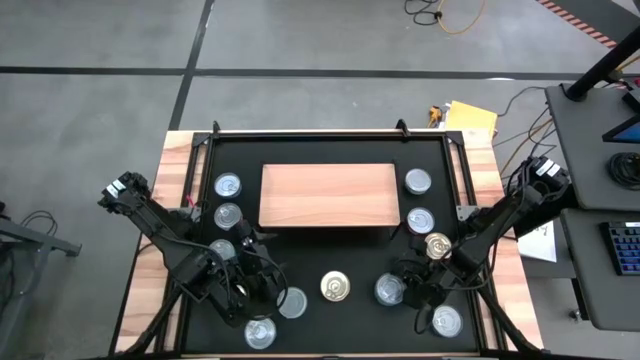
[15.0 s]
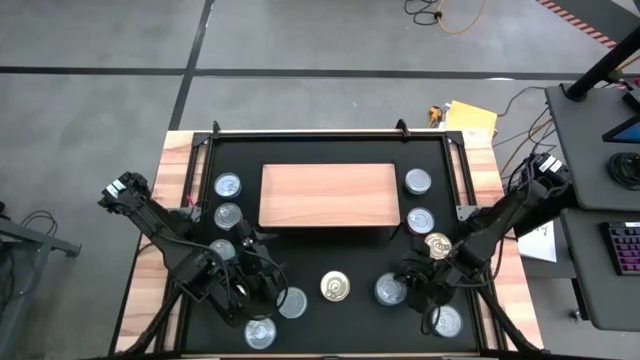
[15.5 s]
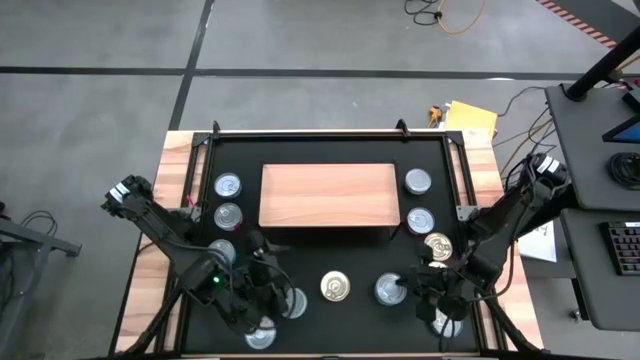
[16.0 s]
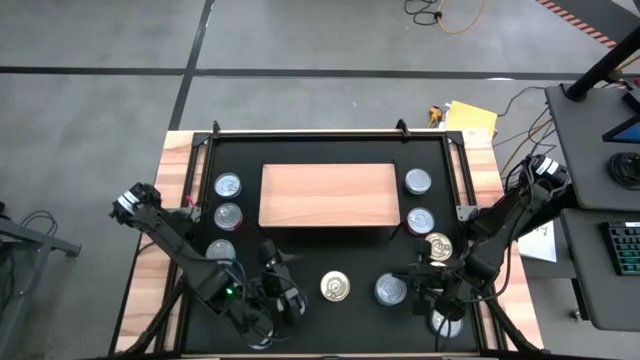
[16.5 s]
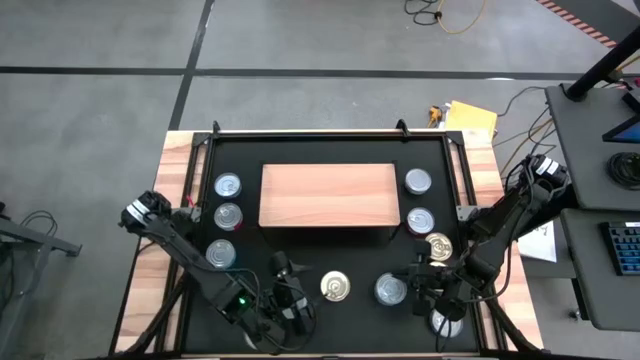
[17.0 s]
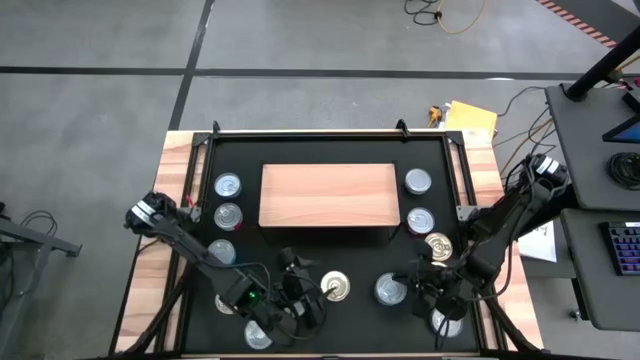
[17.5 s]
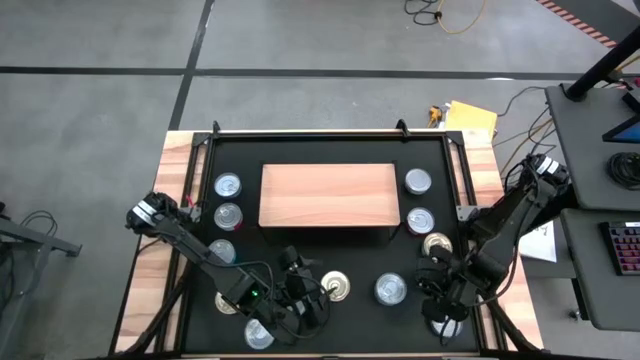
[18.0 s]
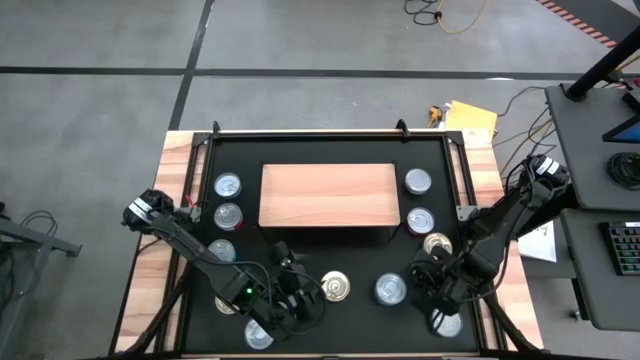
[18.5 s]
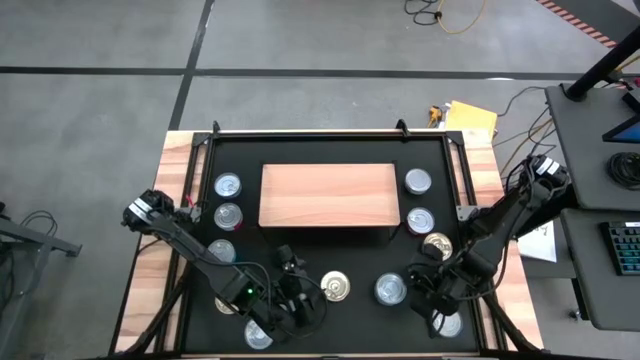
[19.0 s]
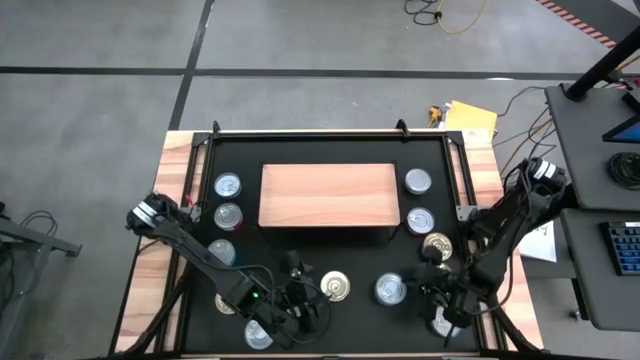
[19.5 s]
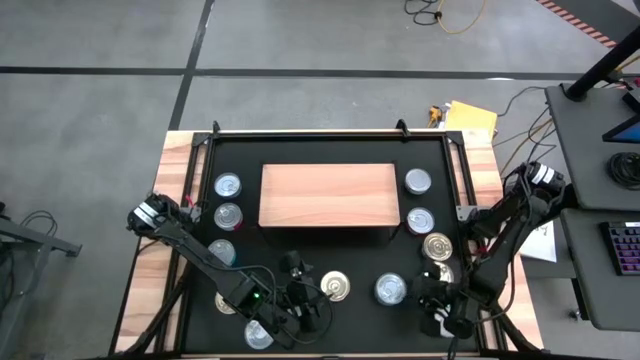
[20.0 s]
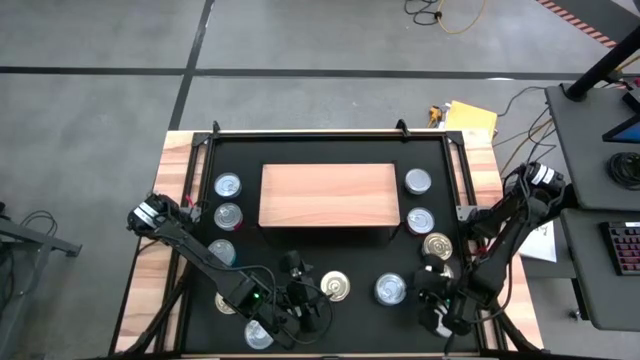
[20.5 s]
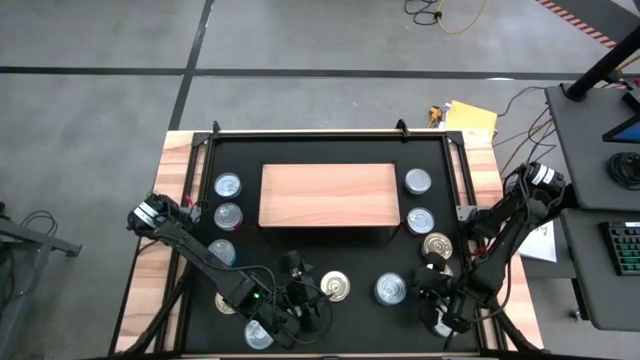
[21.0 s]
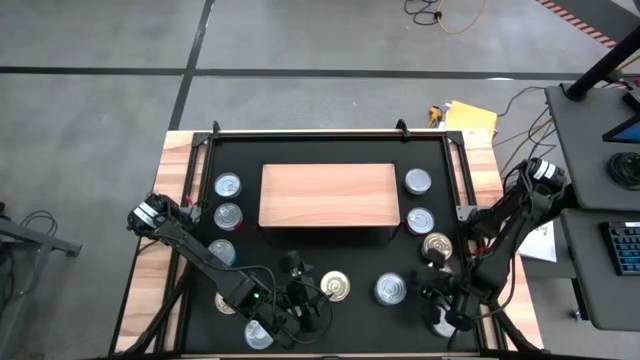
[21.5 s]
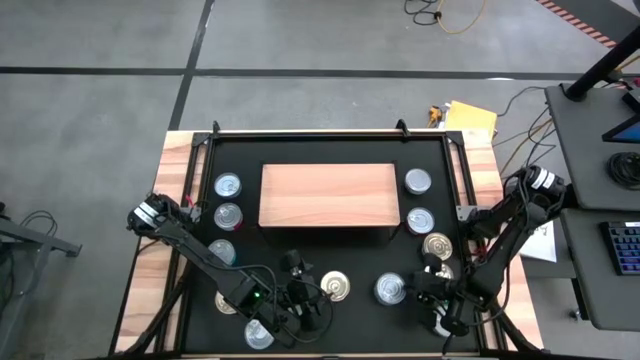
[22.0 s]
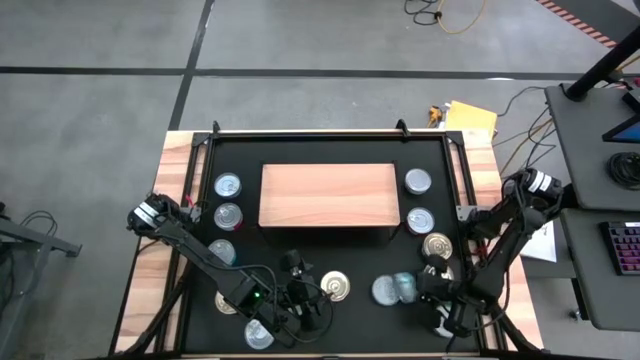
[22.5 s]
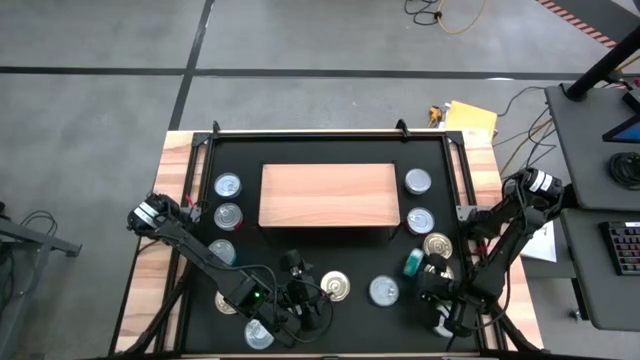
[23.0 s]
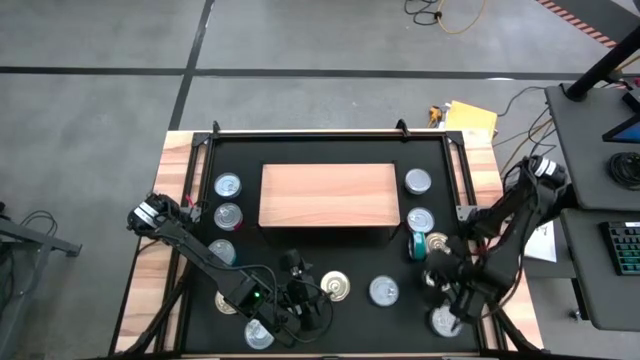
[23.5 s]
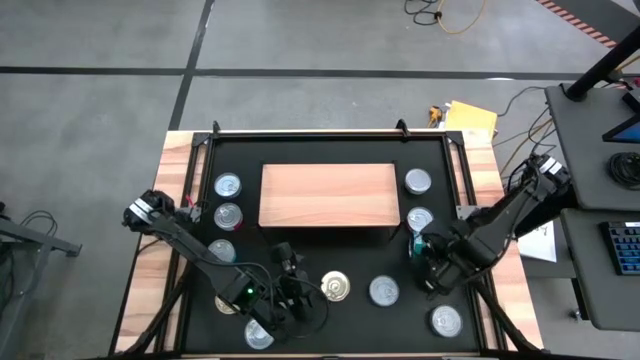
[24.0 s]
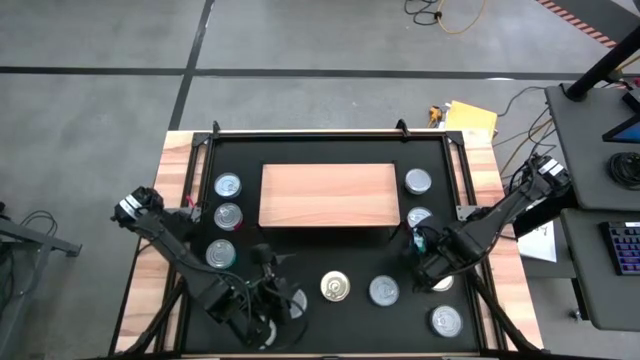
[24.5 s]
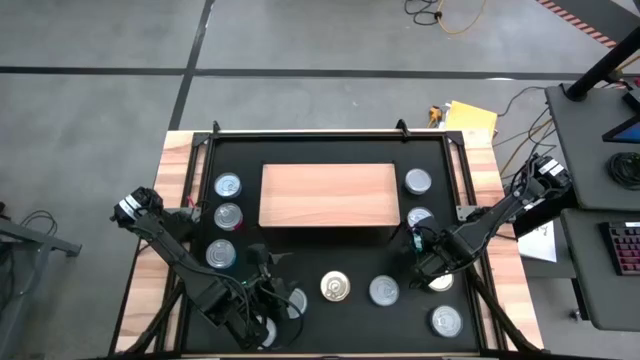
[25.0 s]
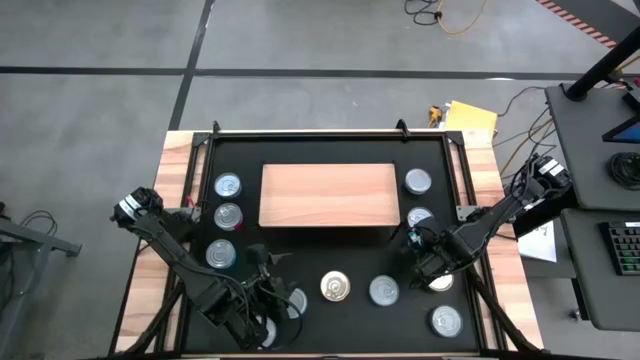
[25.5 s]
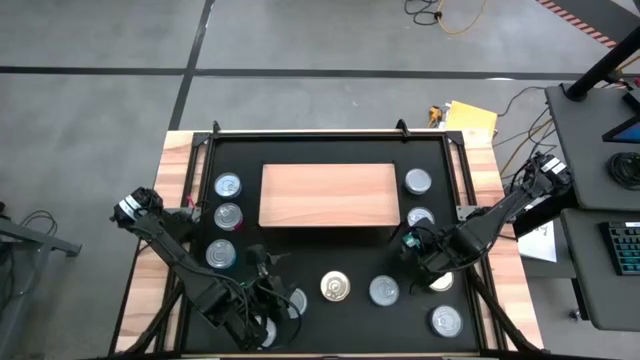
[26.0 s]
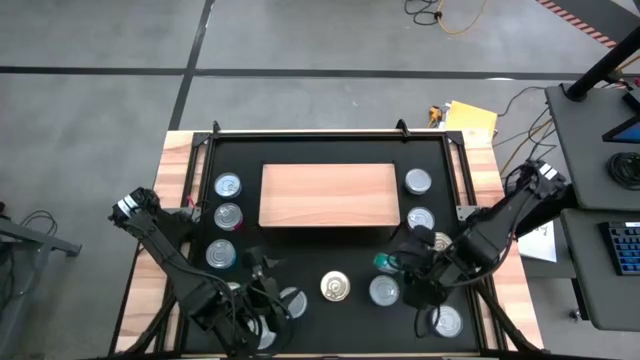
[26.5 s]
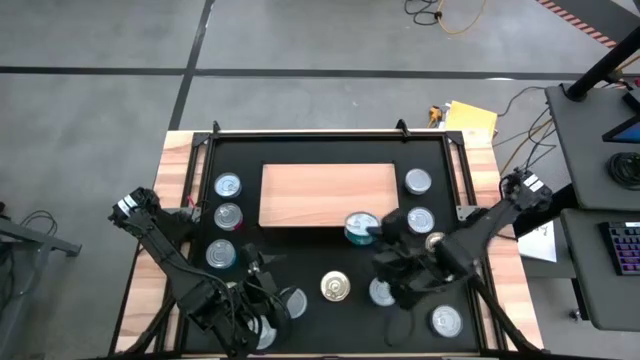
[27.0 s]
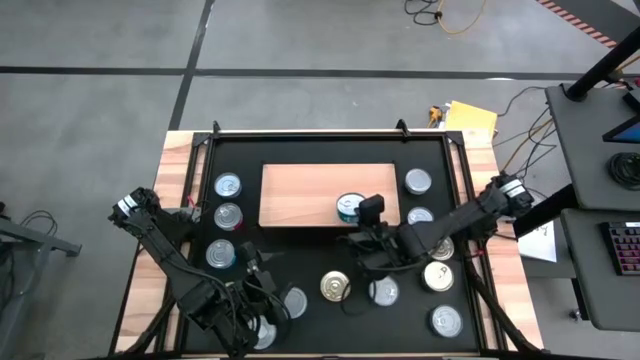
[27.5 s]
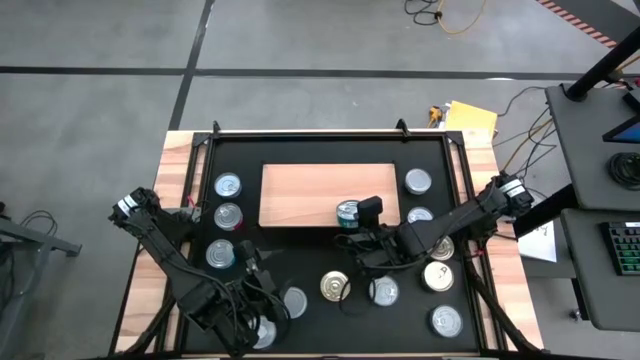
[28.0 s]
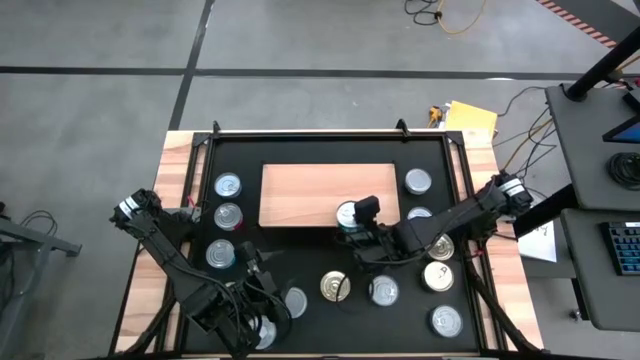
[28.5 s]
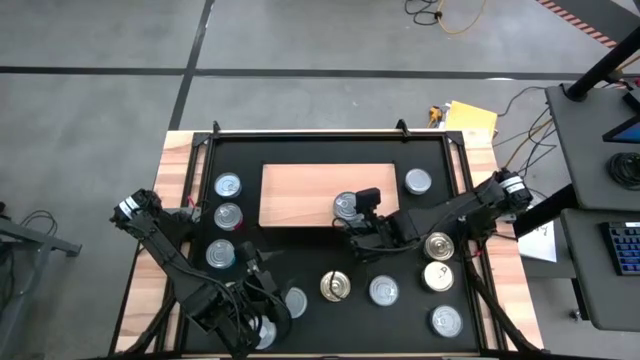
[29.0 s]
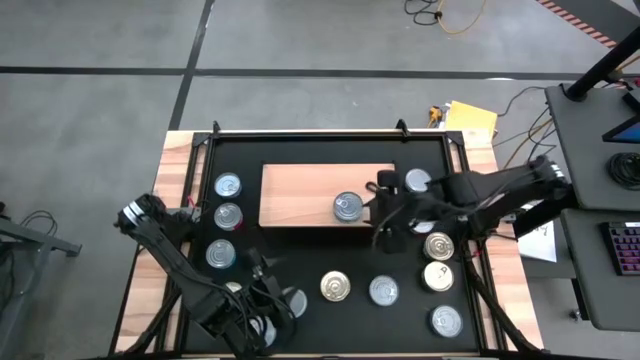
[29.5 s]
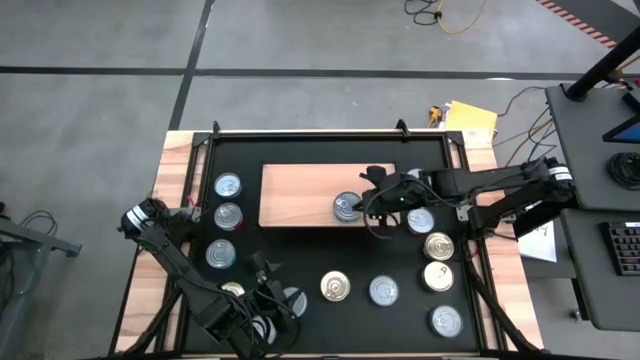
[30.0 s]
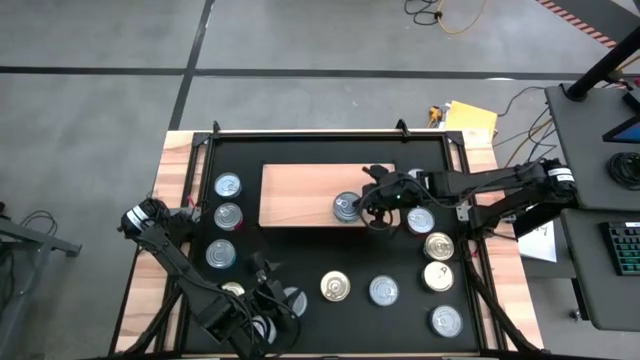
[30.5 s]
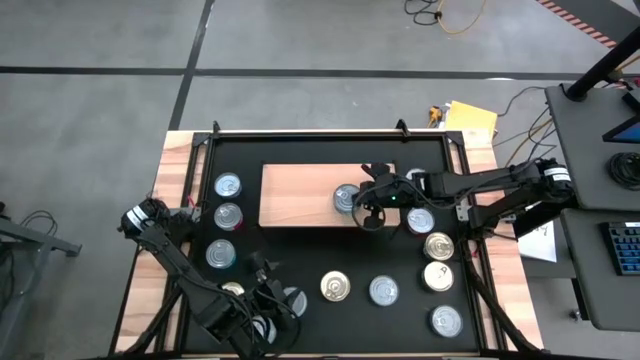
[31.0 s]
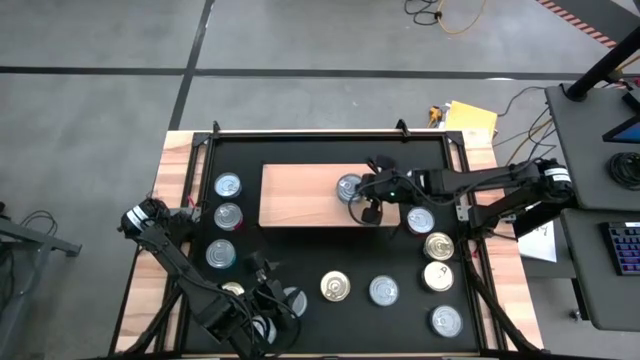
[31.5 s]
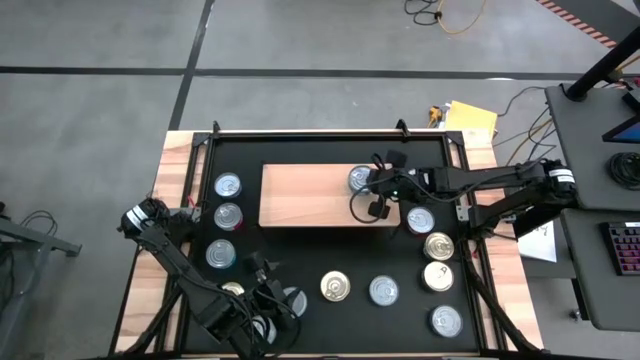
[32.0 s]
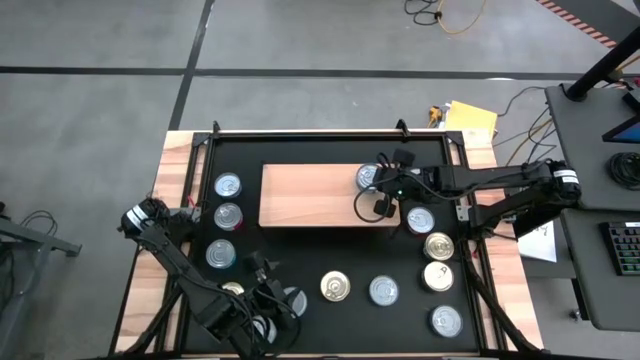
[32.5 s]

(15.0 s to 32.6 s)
Task: Stack canned seafood by type on shelf
Put the light green tuna can on the shelf
